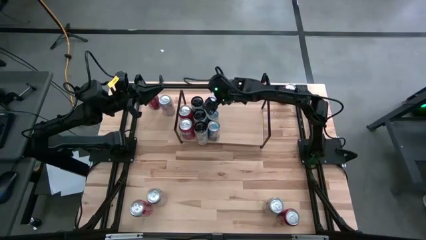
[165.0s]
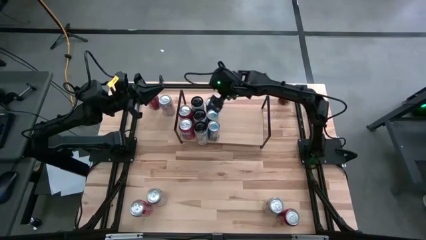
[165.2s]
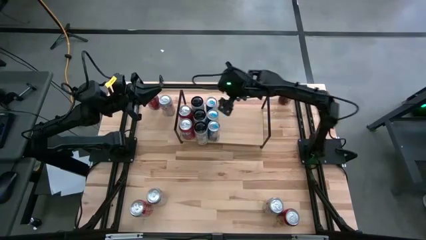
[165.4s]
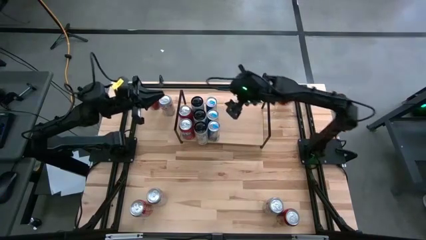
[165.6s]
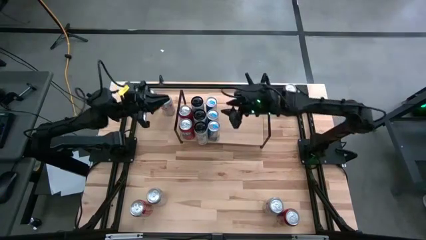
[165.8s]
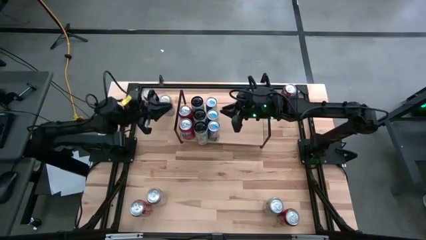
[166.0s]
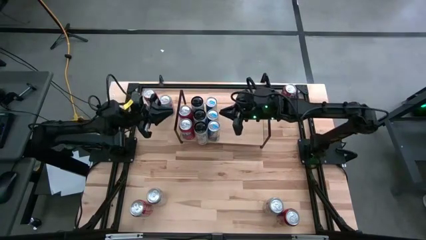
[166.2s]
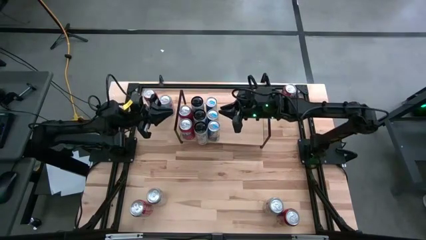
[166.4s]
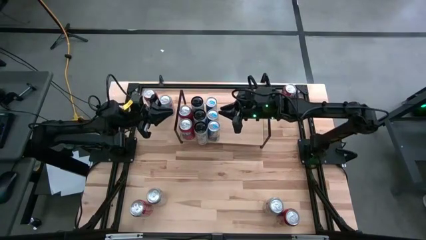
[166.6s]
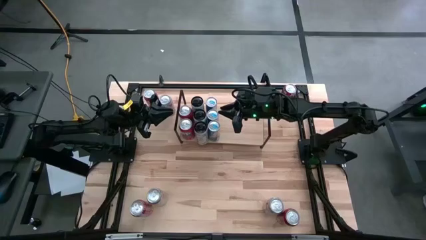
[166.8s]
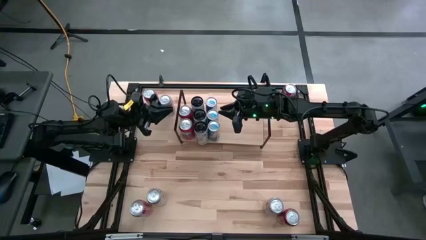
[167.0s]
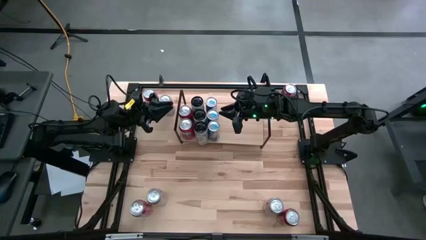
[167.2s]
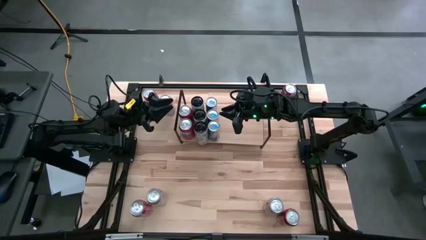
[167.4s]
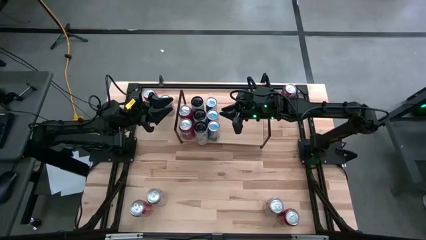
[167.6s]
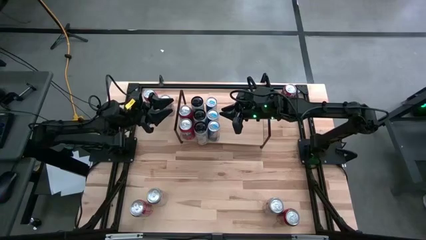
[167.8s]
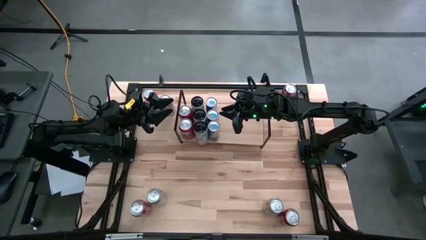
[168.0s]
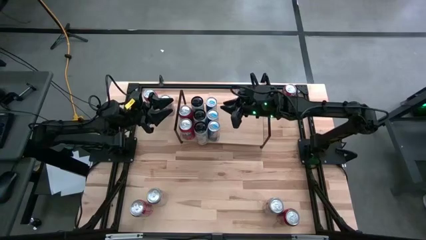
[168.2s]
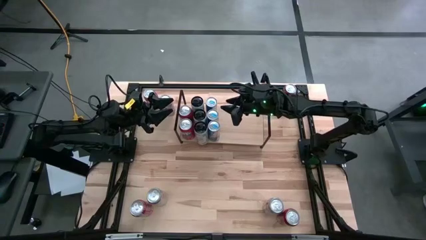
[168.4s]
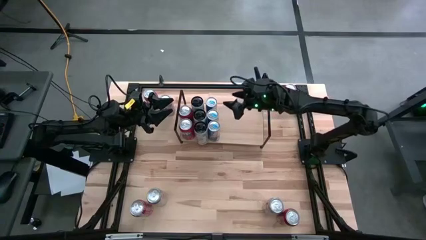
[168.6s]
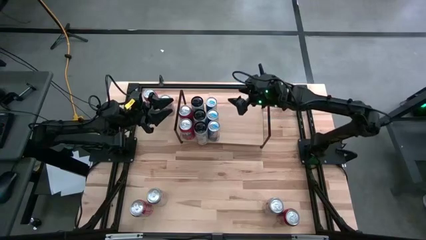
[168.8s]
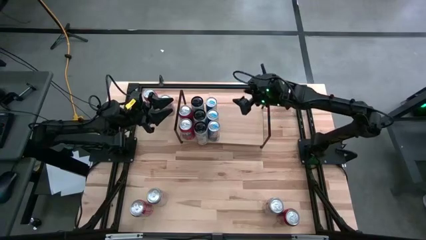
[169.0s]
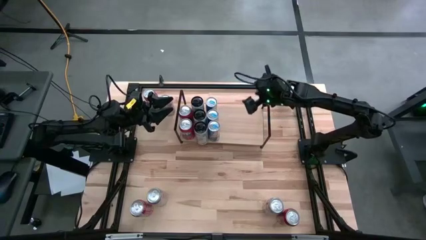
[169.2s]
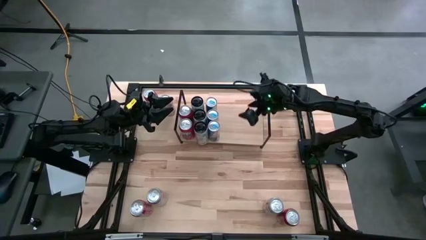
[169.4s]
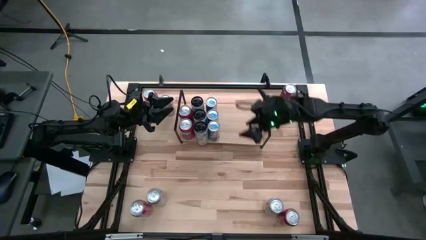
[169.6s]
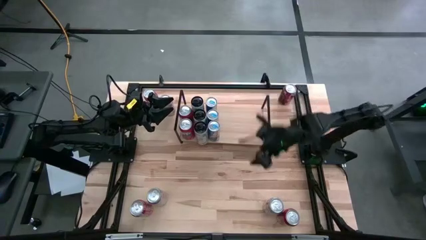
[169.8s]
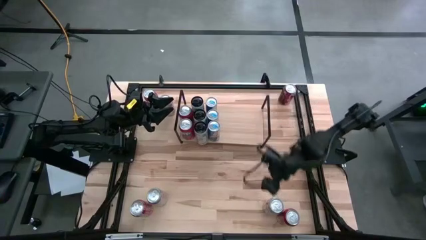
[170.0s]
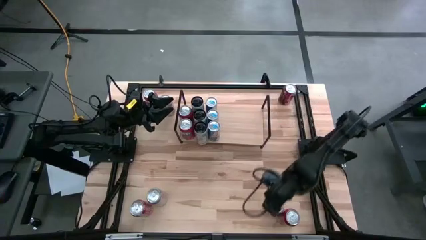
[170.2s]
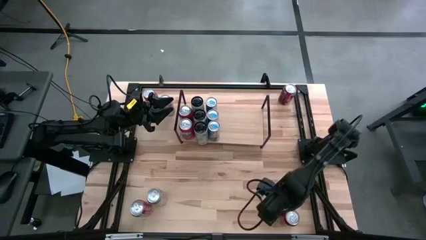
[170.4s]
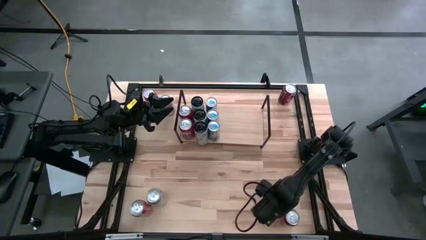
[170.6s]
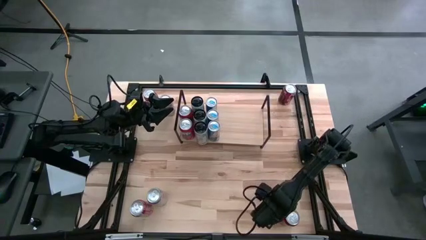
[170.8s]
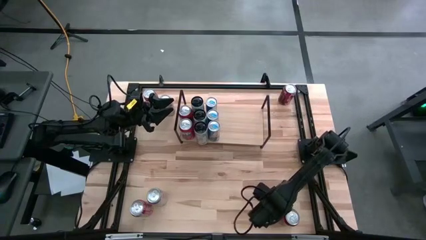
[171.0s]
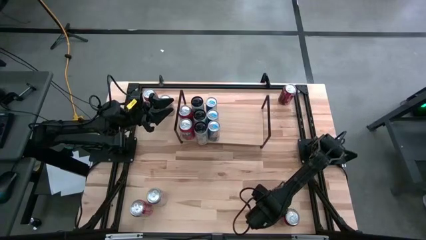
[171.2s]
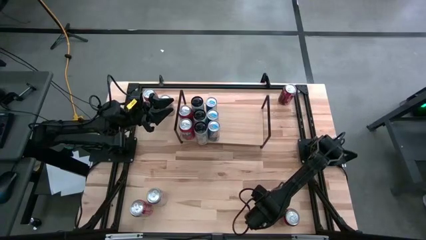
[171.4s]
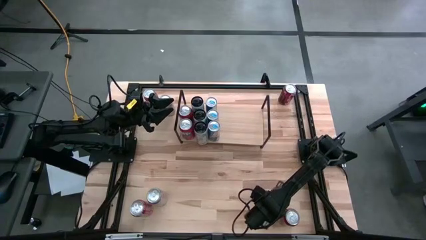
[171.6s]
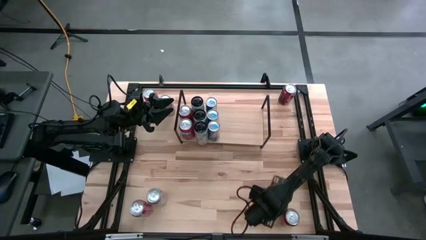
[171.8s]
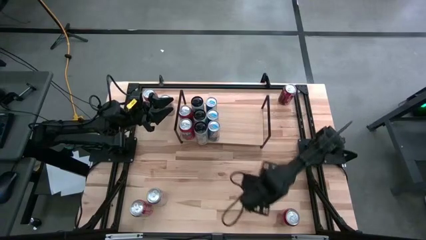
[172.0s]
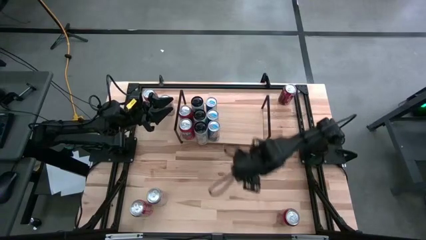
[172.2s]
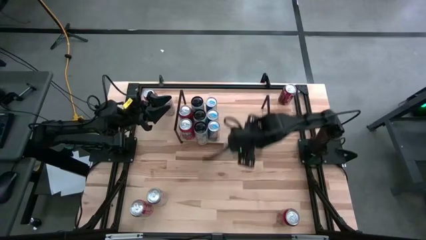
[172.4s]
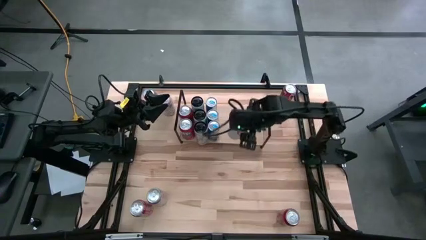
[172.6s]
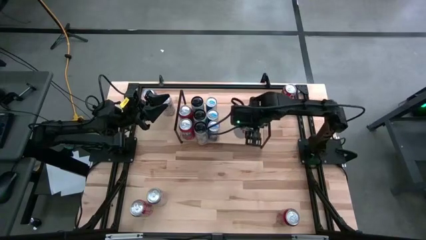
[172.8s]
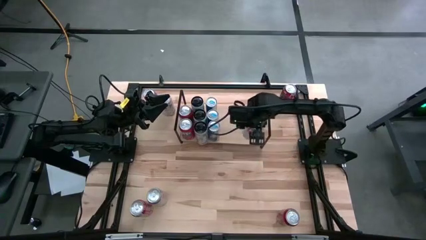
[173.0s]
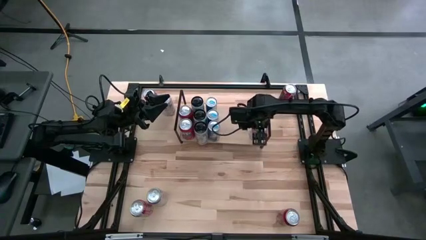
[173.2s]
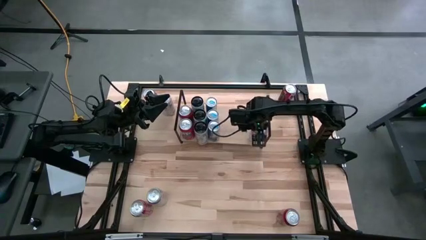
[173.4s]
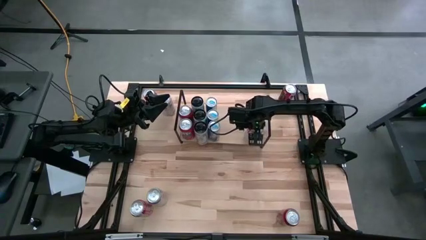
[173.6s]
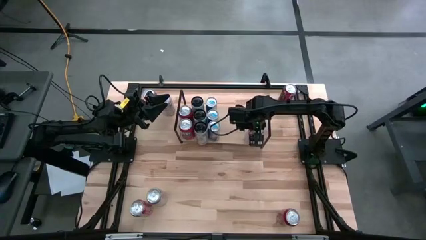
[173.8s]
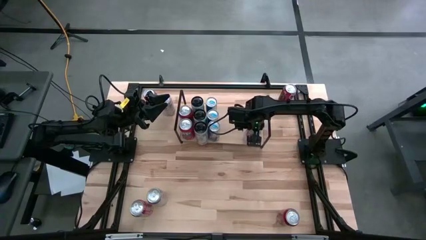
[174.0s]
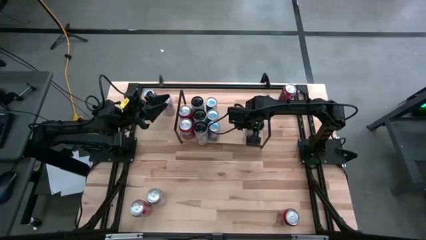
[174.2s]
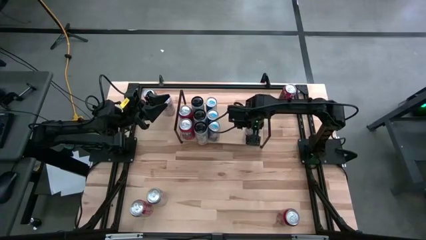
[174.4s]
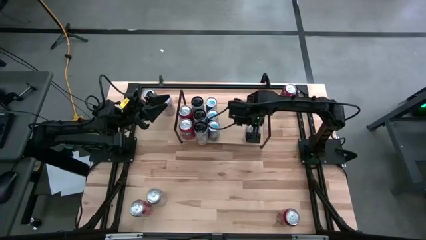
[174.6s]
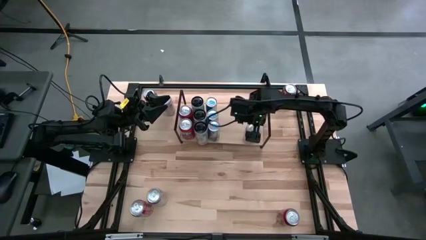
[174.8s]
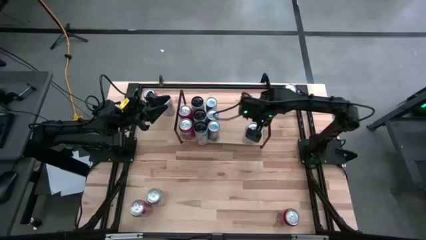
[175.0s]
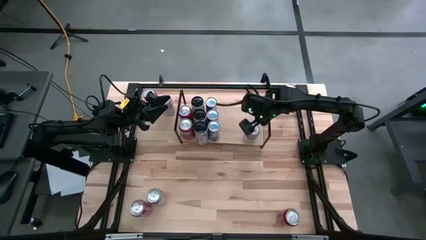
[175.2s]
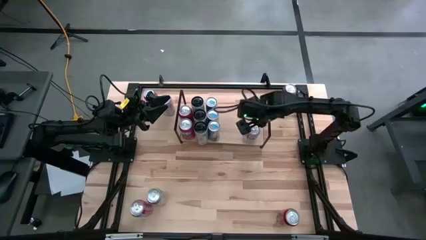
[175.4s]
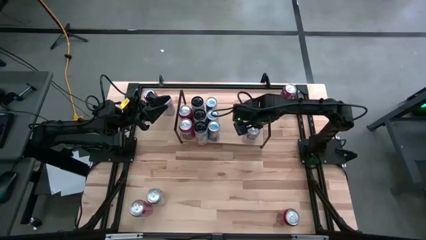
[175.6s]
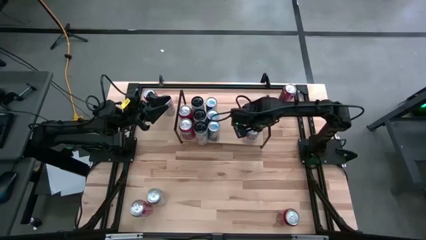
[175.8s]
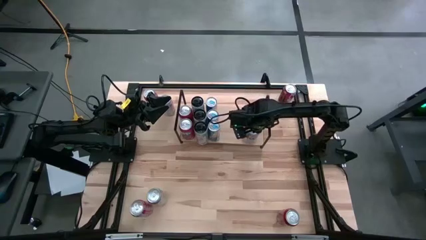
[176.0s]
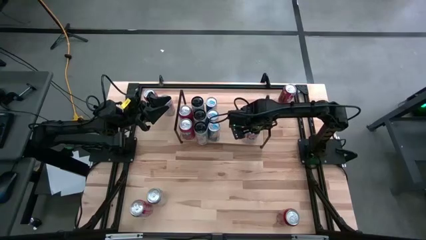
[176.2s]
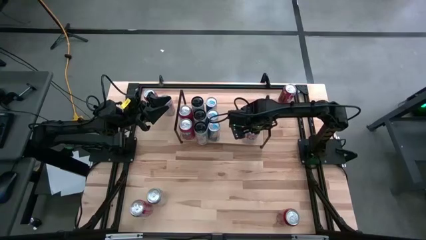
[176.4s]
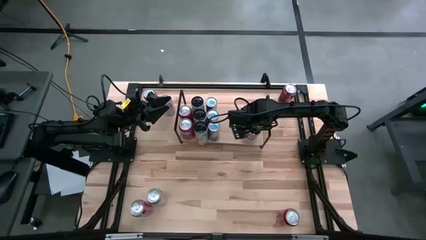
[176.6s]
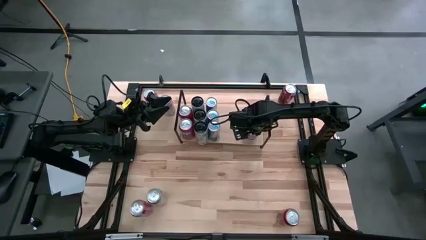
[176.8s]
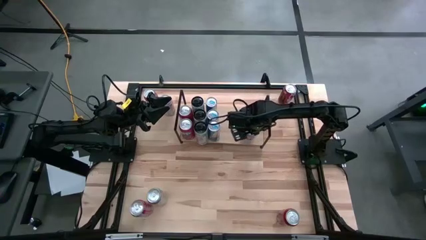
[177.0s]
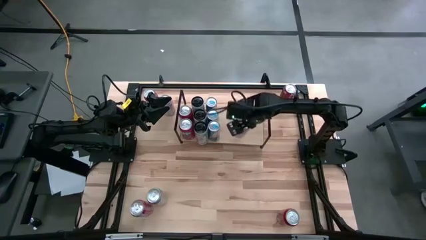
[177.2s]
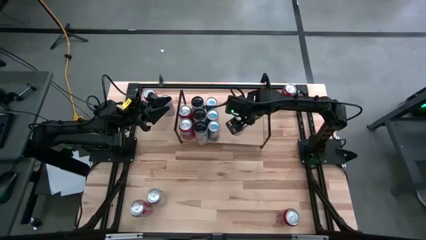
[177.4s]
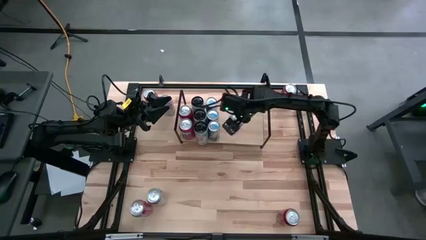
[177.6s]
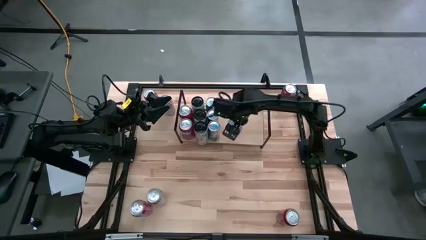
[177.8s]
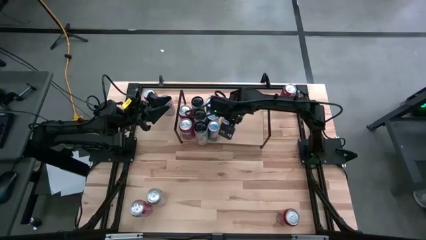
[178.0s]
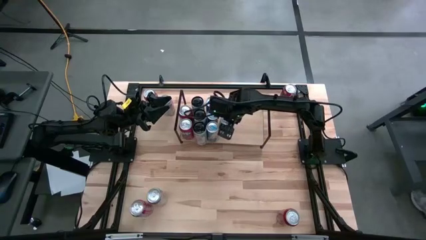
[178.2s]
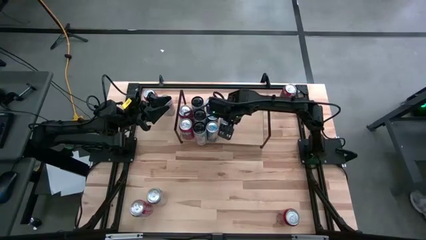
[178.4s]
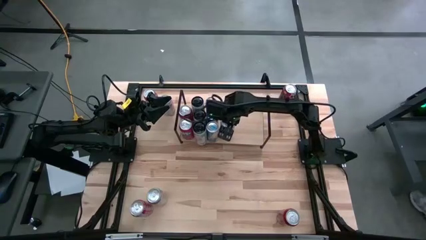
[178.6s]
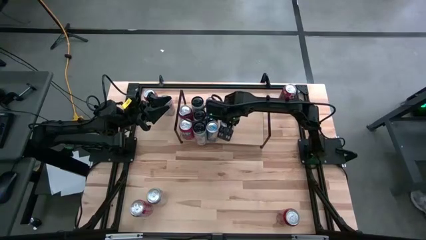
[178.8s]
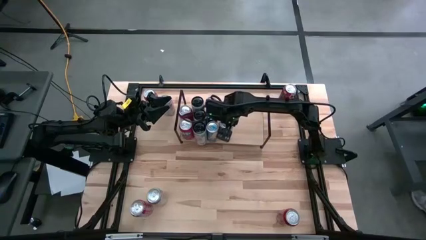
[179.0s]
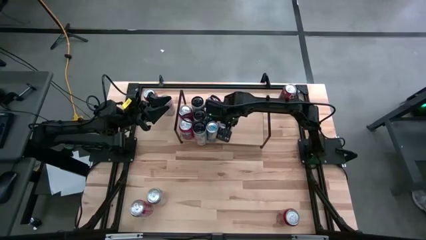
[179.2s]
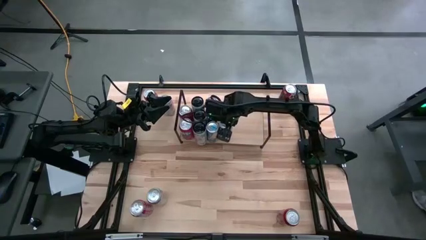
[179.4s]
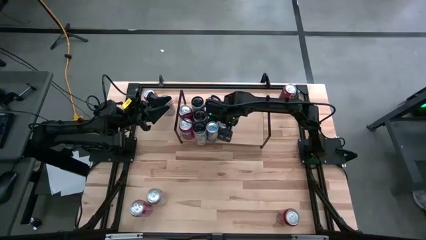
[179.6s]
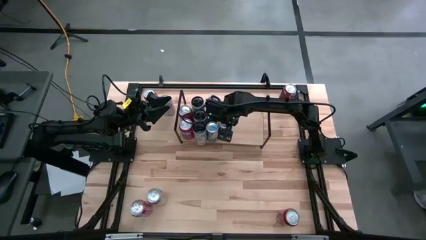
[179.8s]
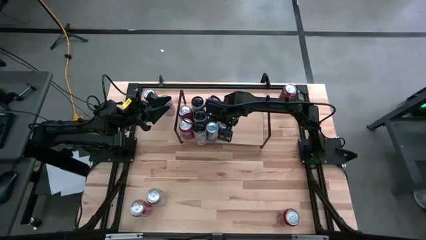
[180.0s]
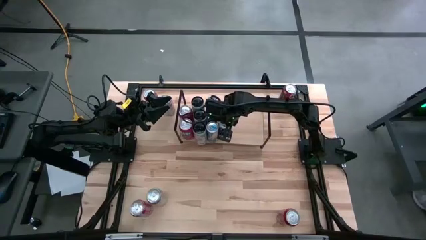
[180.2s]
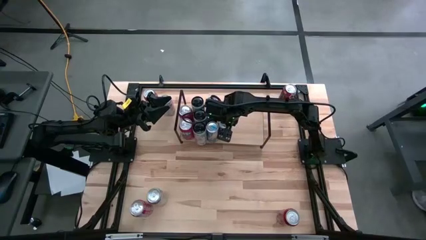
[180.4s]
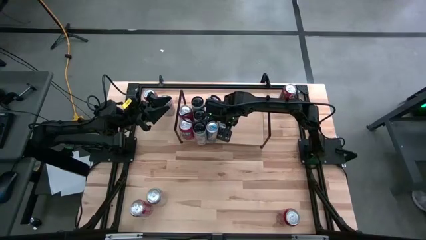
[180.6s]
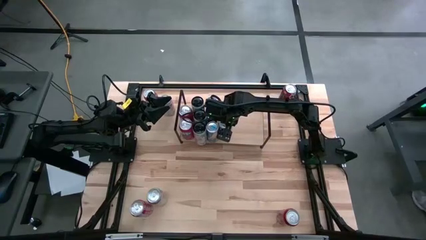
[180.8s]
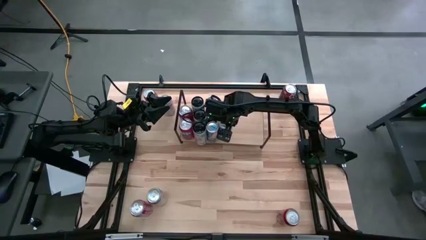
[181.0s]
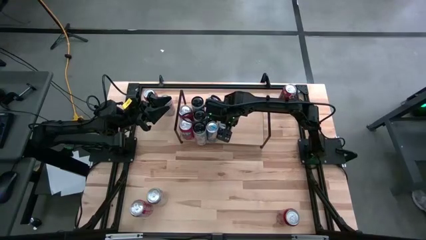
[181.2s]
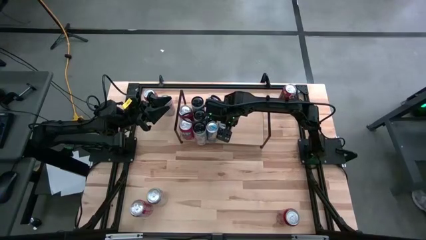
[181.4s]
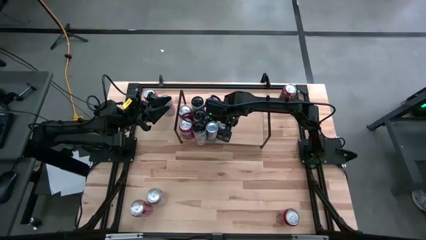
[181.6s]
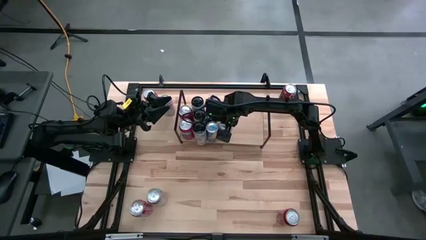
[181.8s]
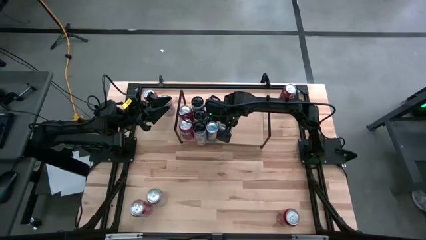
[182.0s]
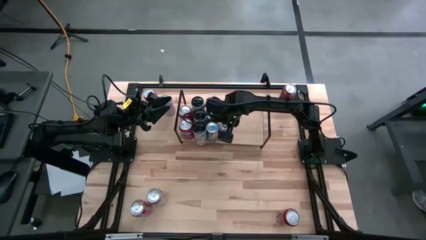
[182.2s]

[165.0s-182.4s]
Task: Place canned beverage on shelf
Put the bottom right red-silver soda can on the shelf
